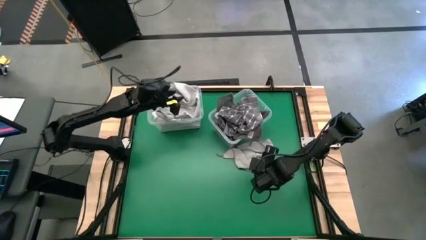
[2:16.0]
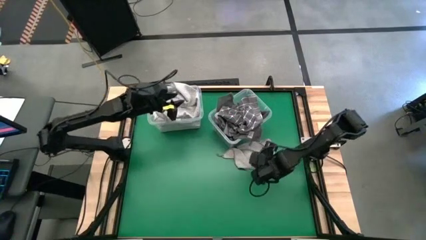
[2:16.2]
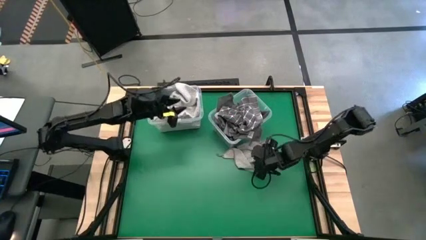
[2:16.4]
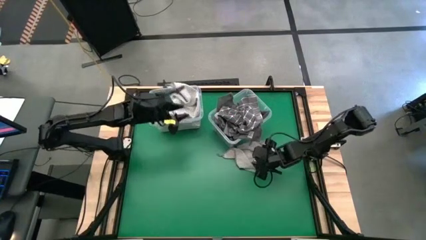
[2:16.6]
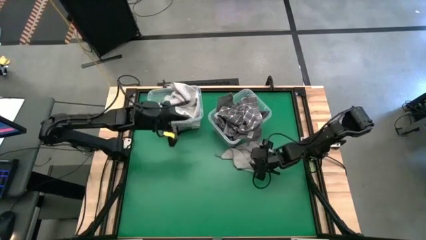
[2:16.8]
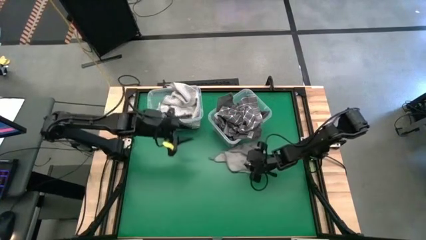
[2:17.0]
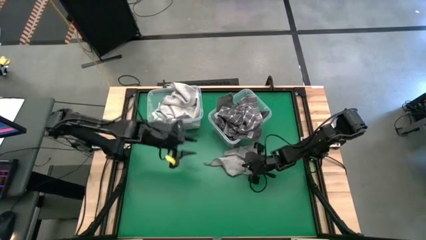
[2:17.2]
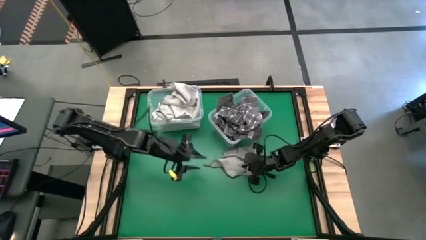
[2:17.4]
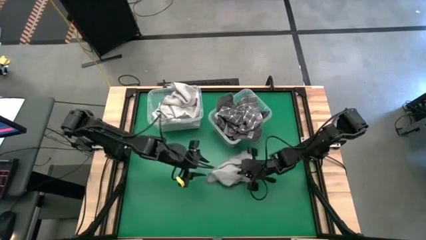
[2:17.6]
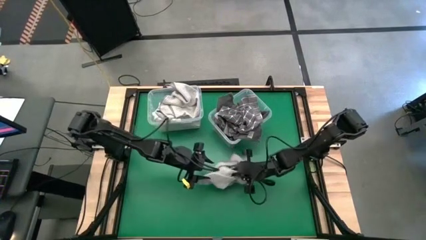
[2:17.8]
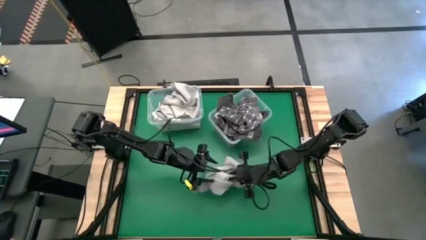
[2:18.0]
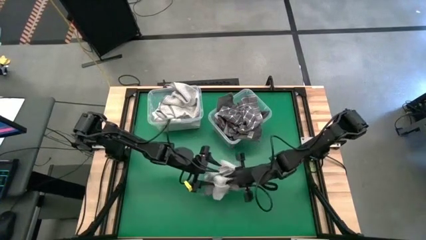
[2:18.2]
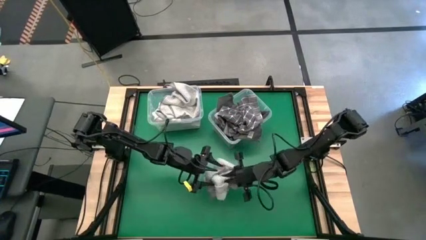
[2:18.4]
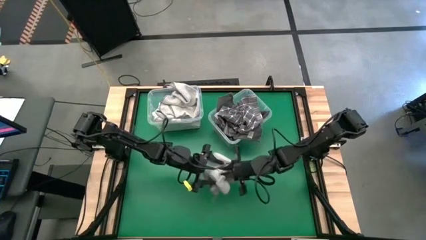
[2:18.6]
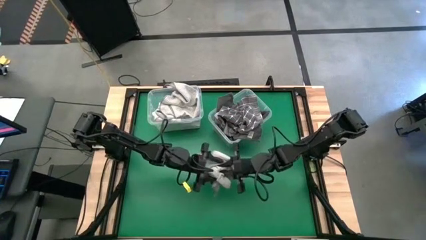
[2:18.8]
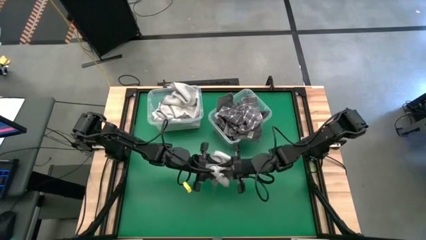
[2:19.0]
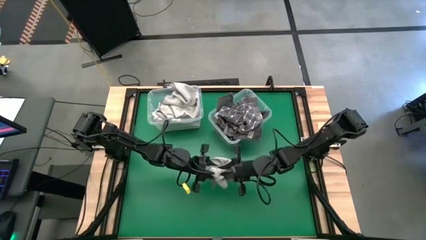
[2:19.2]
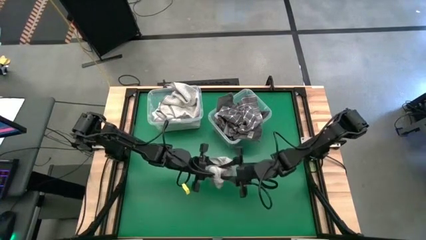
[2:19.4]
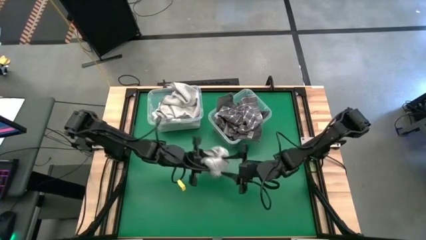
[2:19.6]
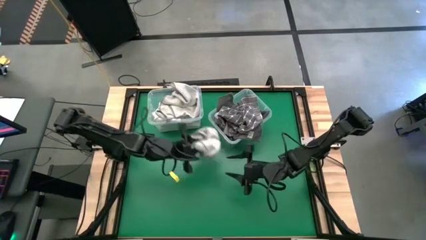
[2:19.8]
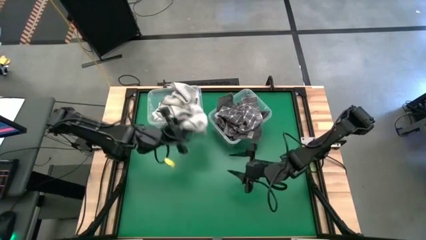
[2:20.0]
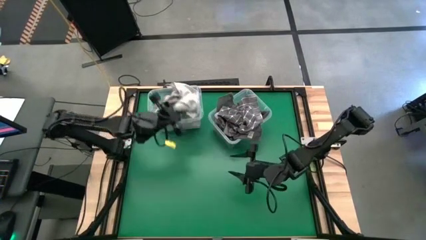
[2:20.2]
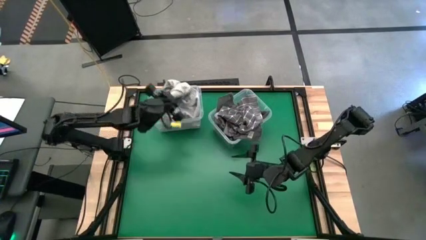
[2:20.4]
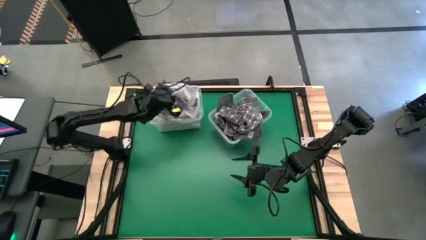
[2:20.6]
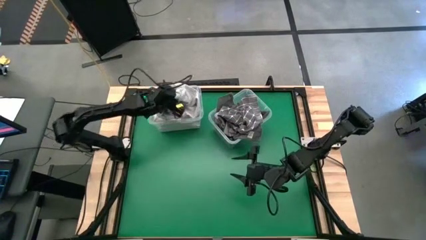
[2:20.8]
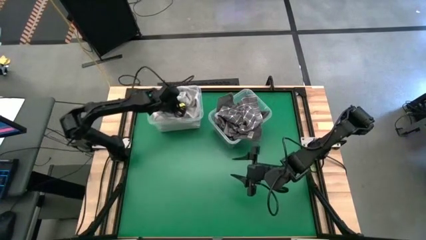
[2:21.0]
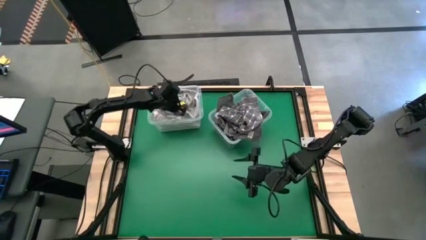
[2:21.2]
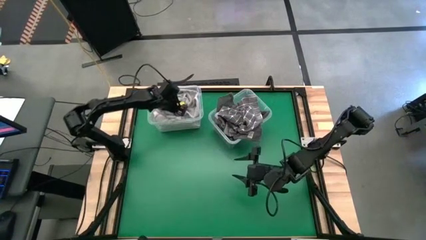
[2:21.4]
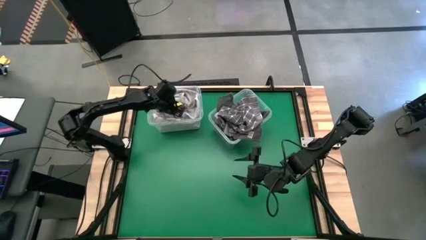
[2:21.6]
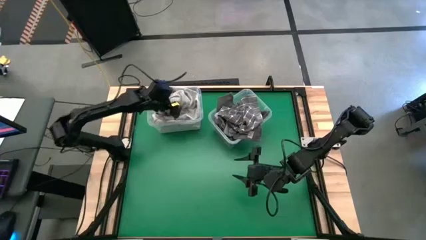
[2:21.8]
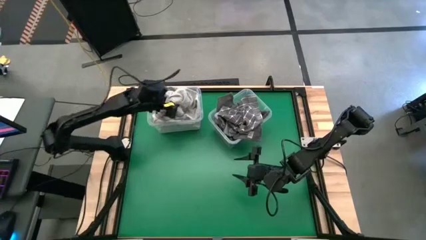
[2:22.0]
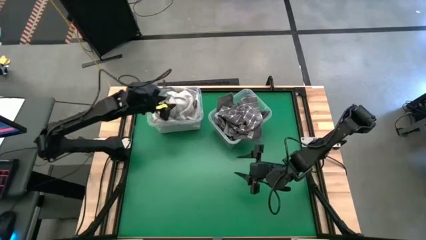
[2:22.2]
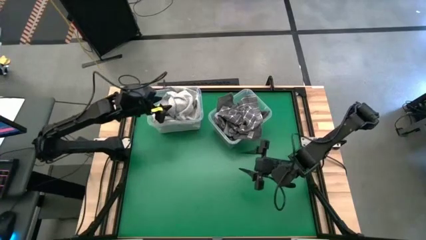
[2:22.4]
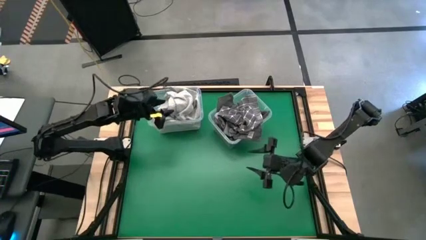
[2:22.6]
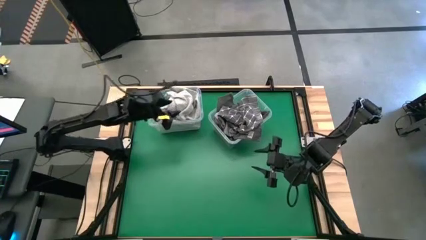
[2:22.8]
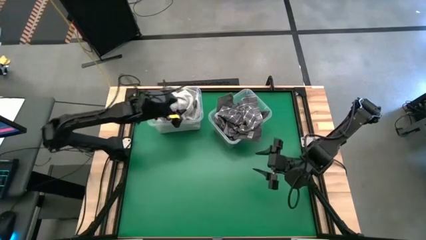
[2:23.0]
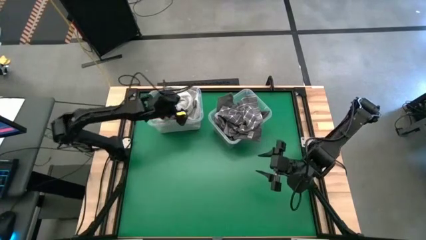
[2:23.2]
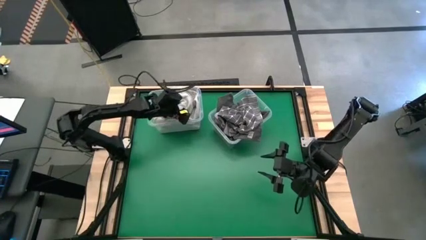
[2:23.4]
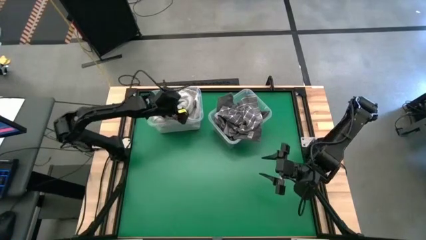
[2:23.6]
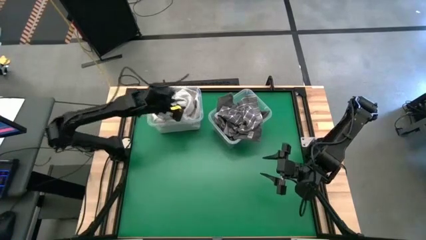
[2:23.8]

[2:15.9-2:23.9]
Task: Sort towels by color in basket
Put the light gray towel into the left transparent bin

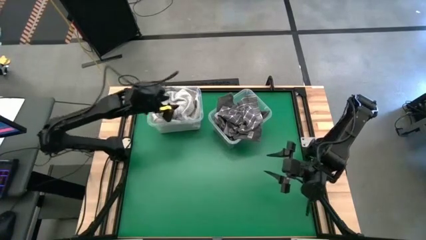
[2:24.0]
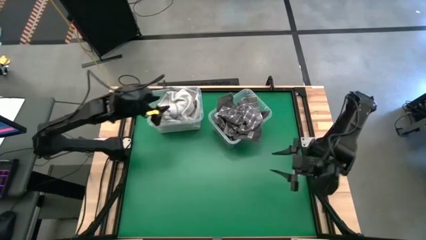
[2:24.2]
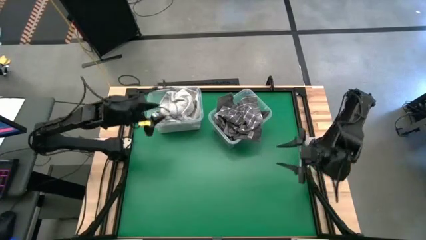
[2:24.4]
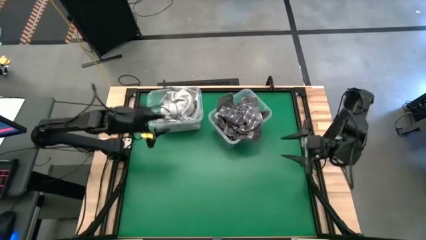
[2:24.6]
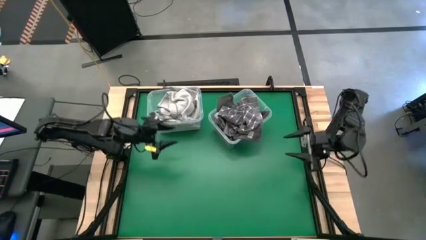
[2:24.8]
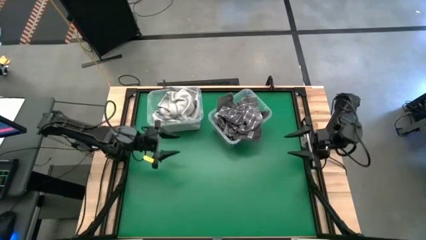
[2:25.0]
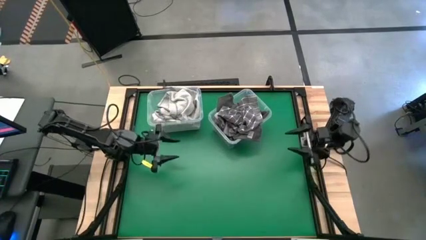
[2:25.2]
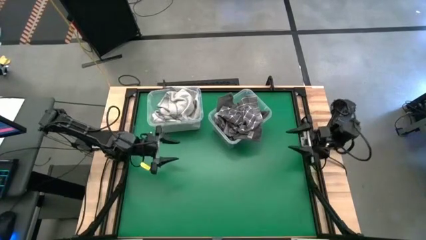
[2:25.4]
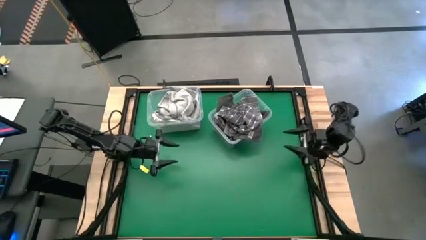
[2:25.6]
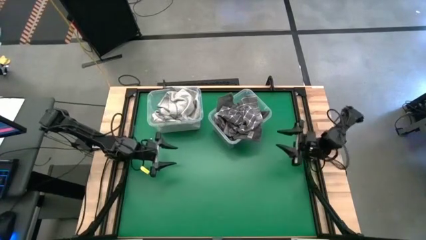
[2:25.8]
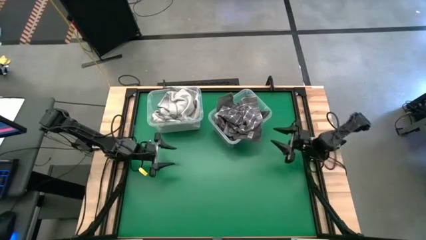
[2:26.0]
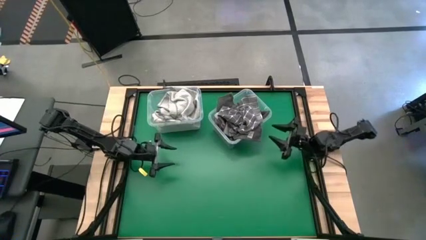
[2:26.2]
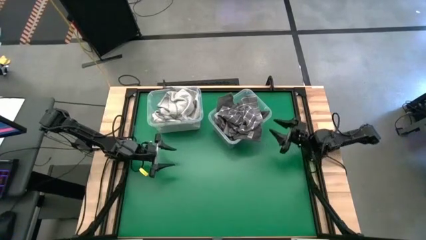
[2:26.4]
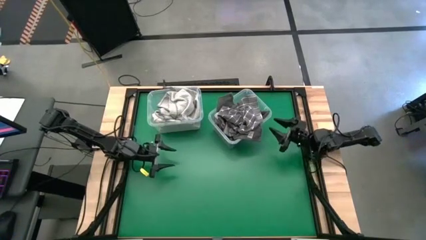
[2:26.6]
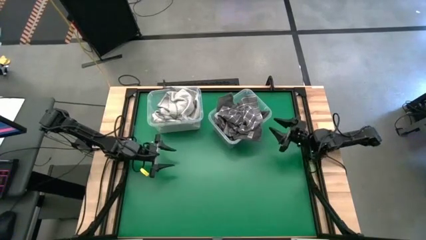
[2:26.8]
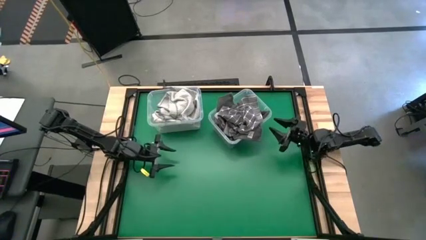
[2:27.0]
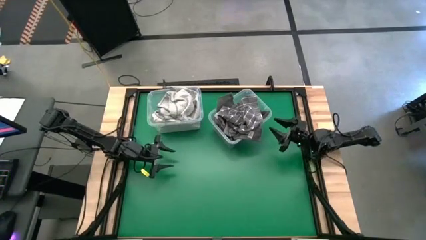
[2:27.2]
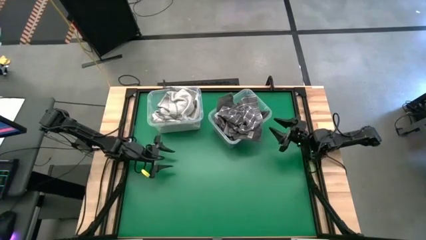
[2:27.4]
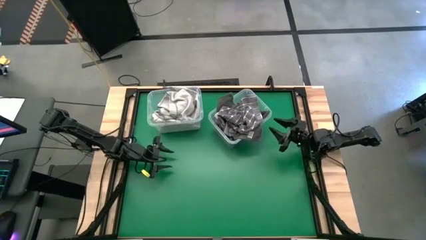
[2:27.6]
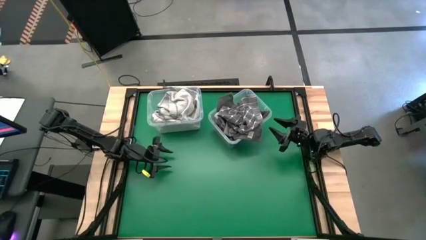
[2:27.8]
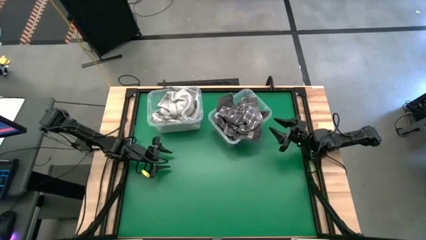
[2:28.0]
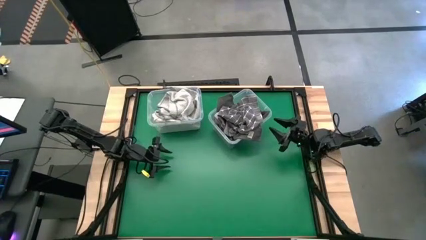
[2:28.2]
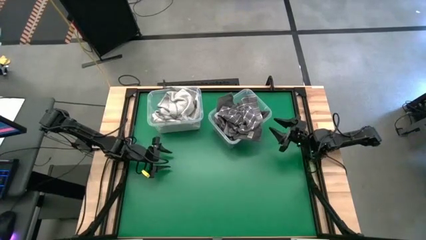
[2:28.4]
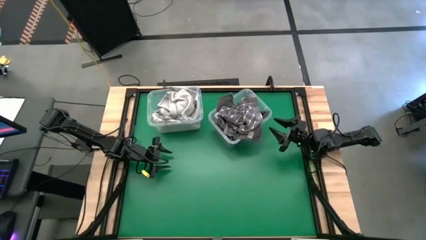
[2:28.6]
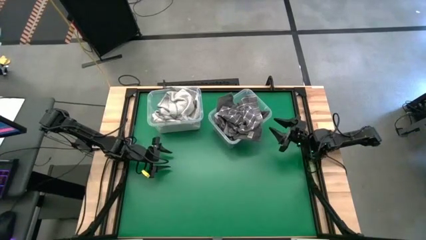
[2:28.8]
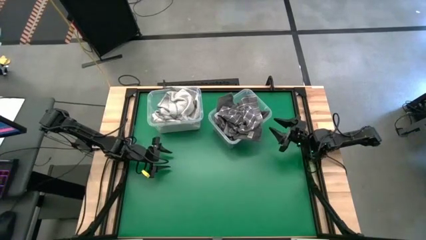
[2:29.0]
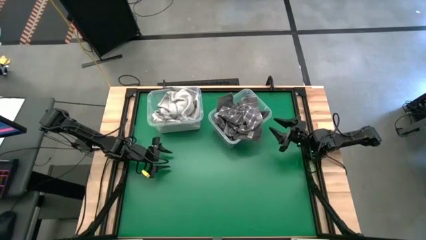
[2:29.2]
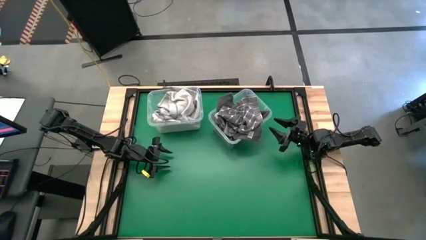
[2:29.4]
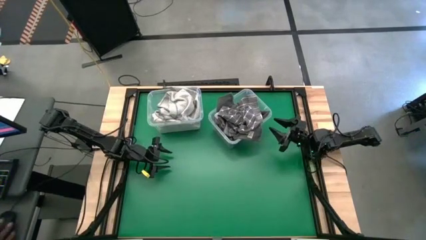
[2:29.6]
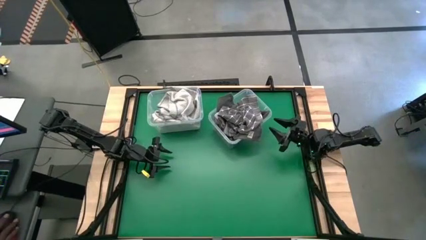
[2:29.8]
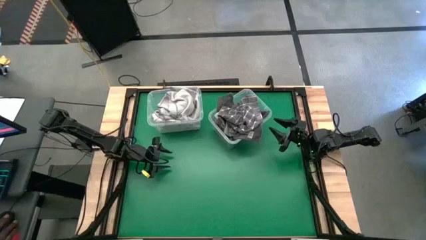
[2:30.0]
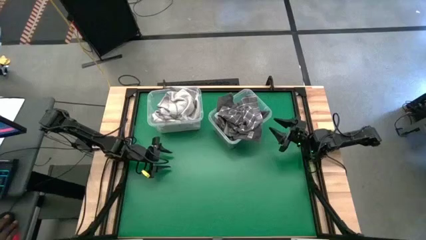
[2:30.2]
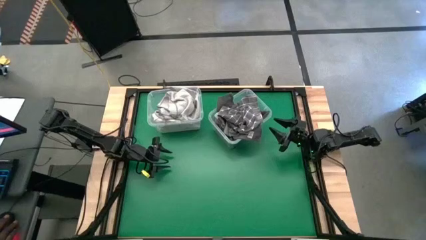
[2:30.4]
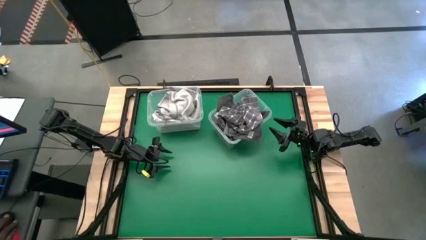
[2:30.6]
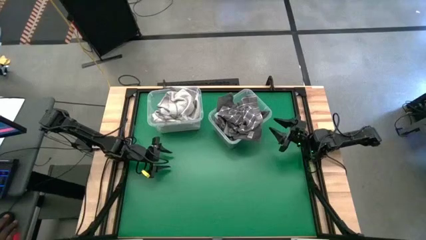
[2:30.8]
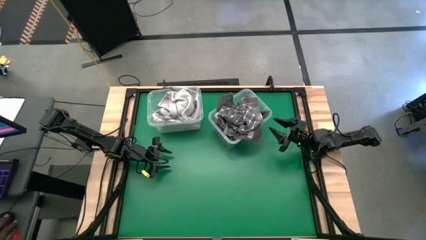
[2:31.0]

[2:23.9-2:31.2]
Return to Home Position
